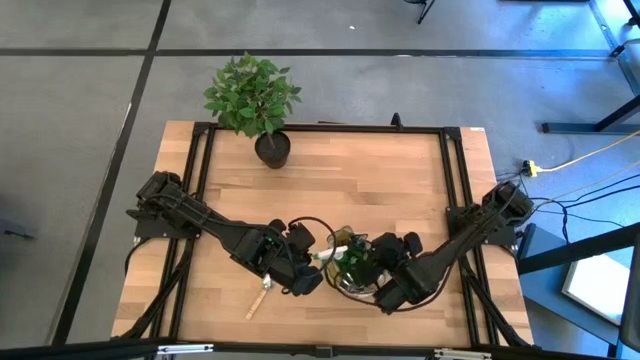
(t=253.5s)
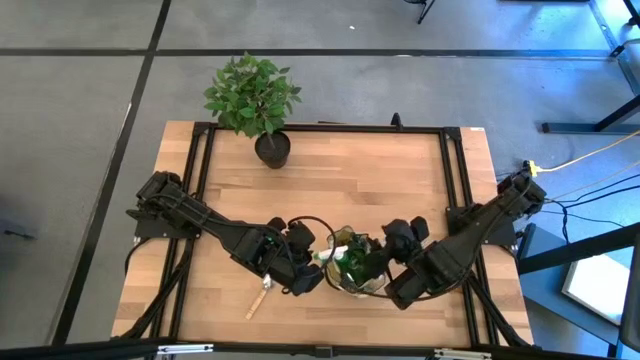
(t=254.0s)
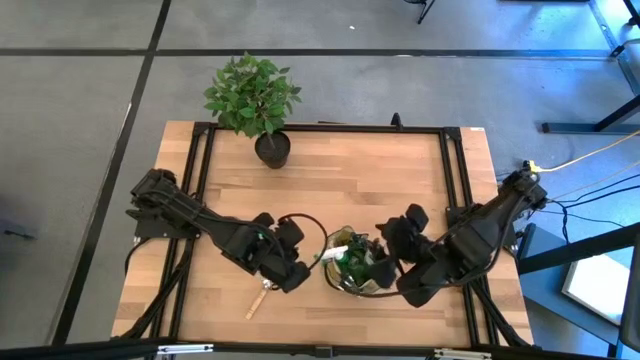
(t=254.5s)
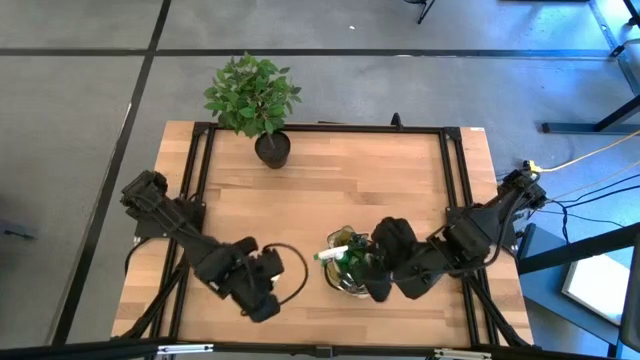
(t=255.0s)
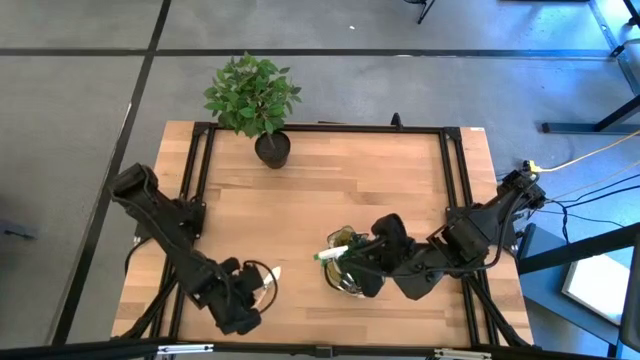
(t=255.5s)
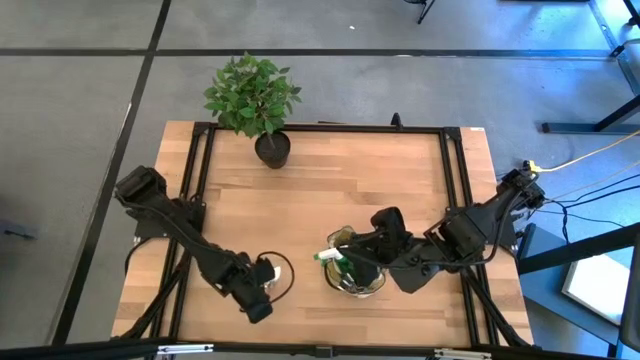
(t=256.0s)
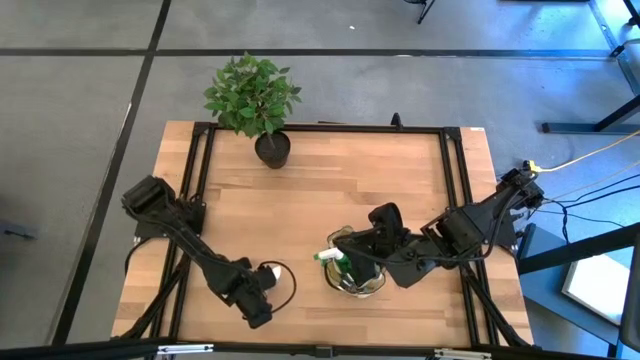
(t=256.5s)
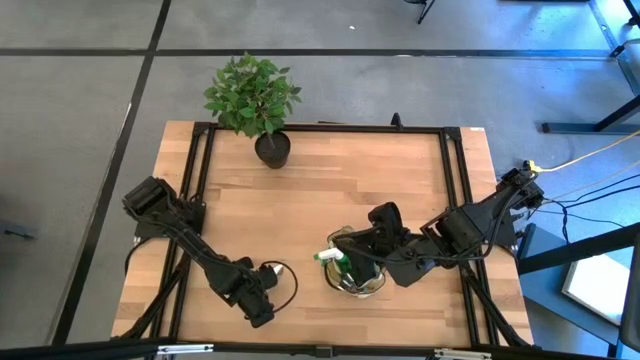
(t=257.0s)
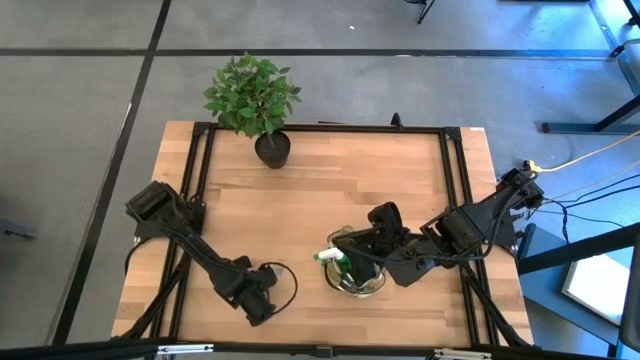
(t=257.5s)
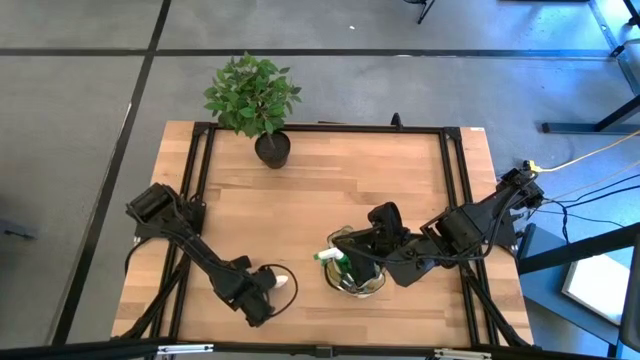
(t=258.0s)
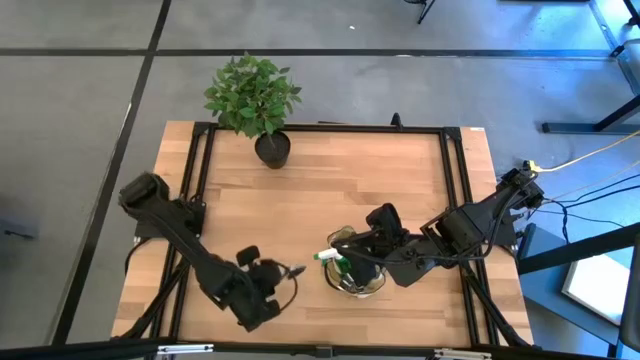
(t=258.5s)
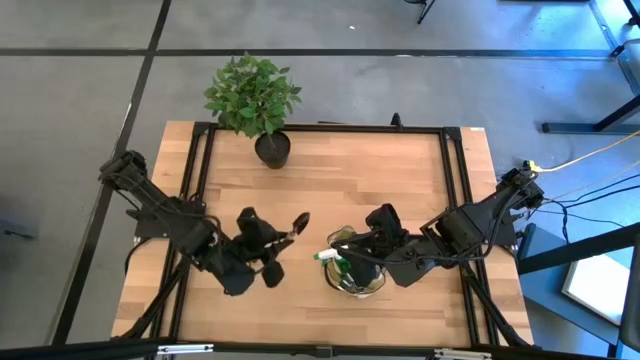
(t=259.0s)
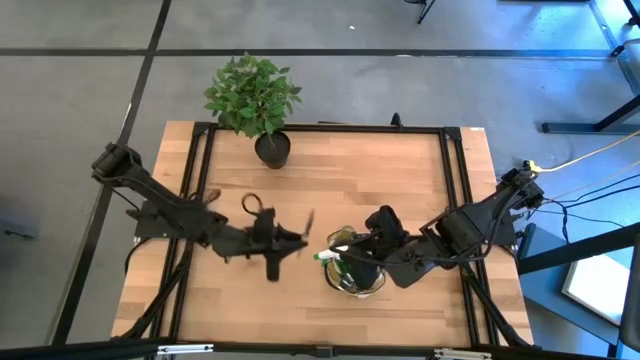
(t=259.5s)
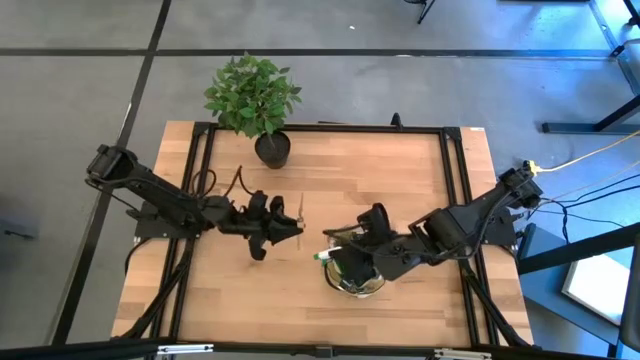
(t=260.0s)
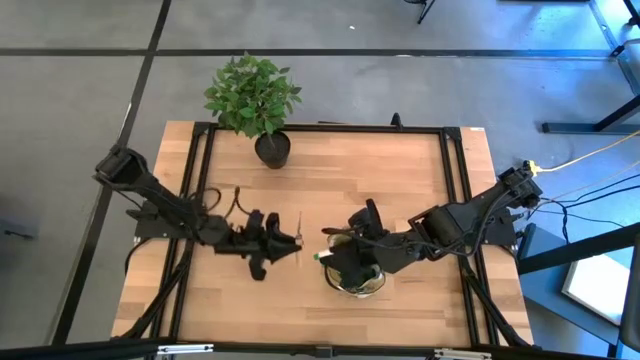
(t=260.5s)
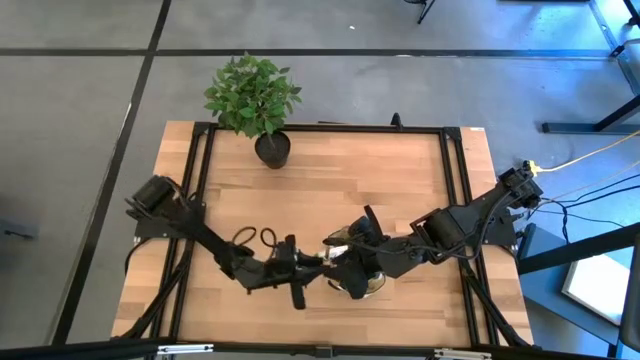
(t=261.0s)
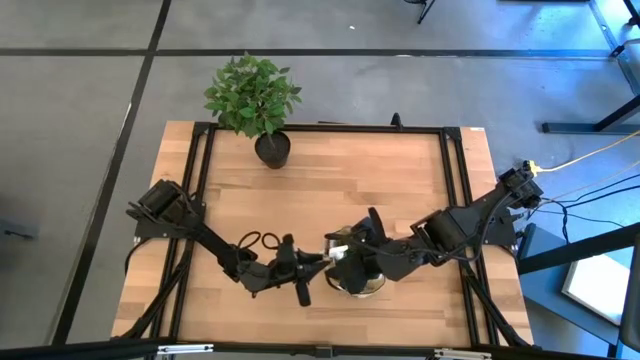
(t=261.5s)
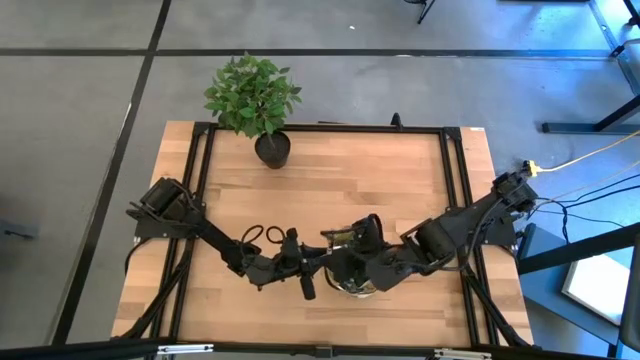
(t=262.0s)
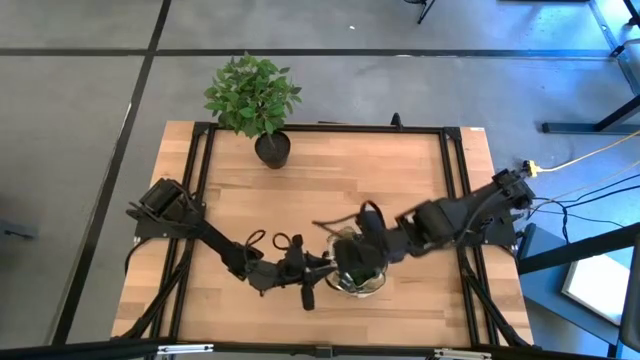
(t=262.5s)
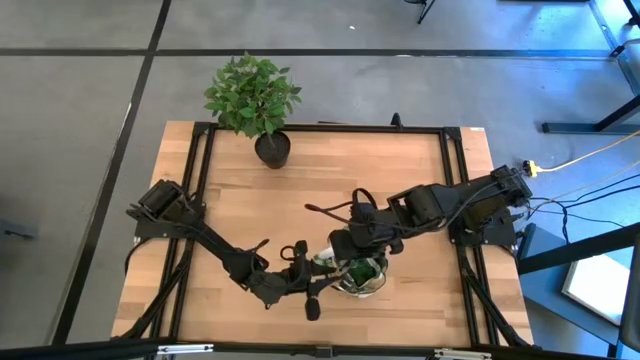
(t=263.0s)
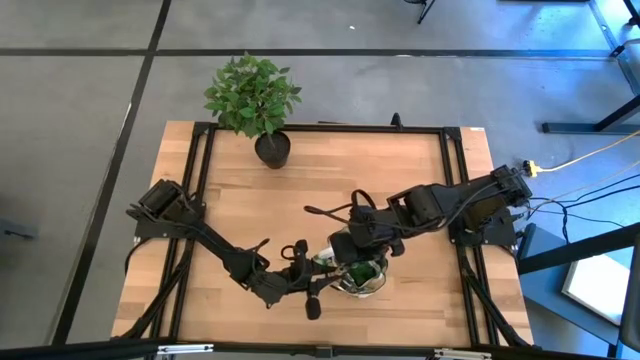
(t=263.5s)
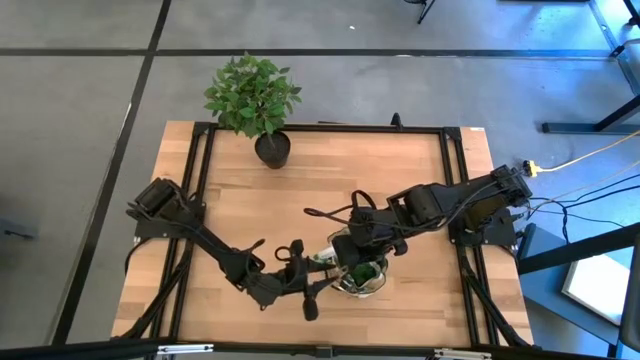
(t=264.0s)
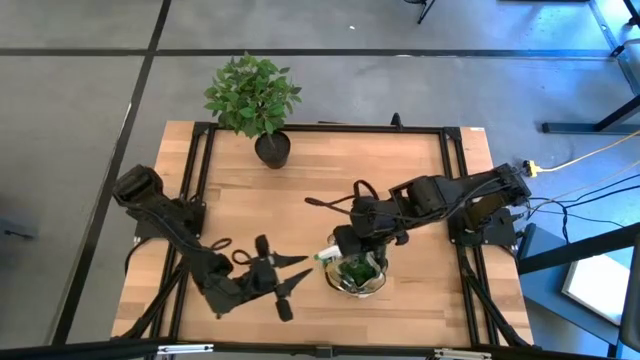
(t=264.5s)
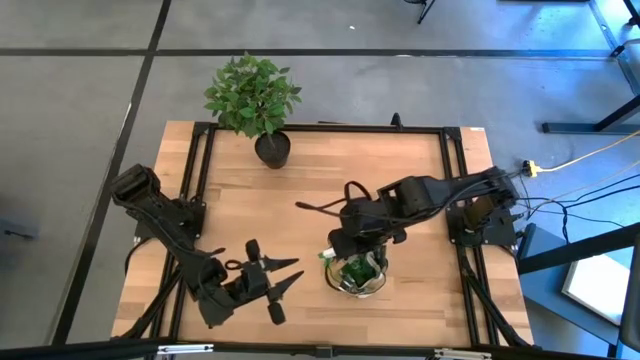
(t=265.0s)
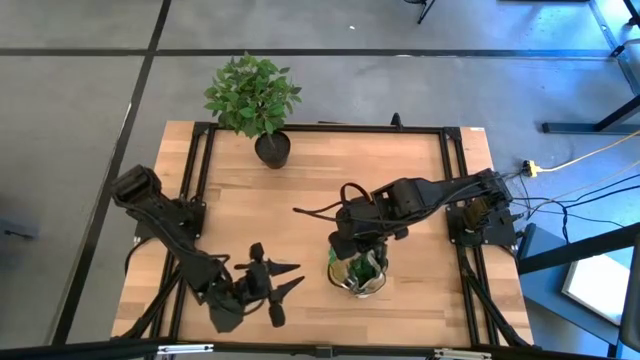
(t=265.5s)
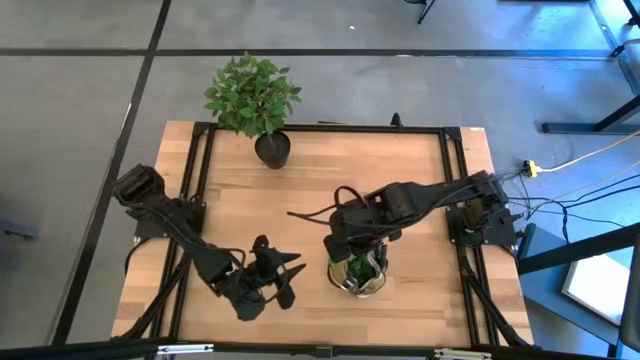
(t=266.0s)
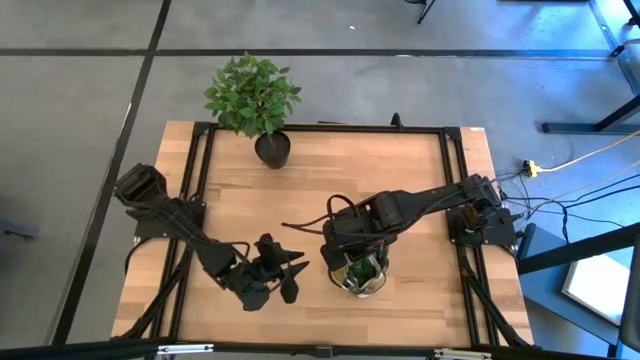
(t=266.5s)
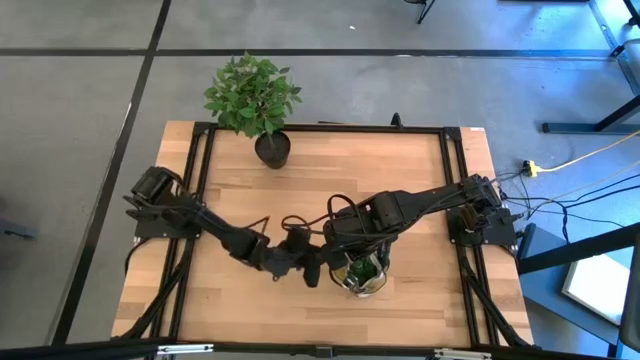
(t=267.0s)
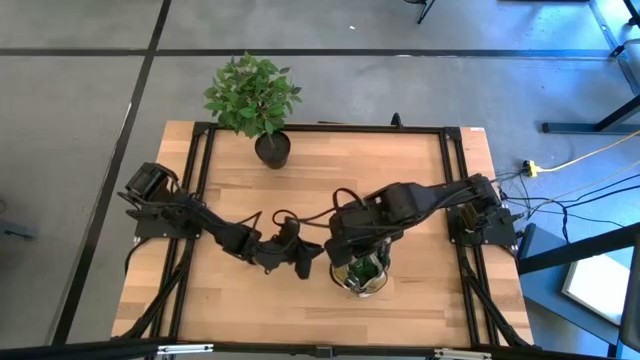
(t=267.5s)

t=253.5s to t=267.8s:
Task: Pick & Place Garden tools in Gardening bag
Put the brown trowel into the brown gardening bag

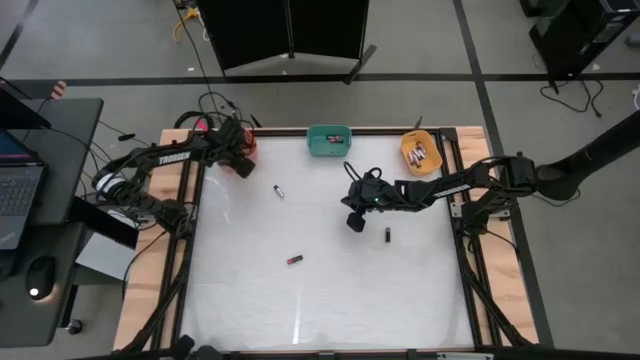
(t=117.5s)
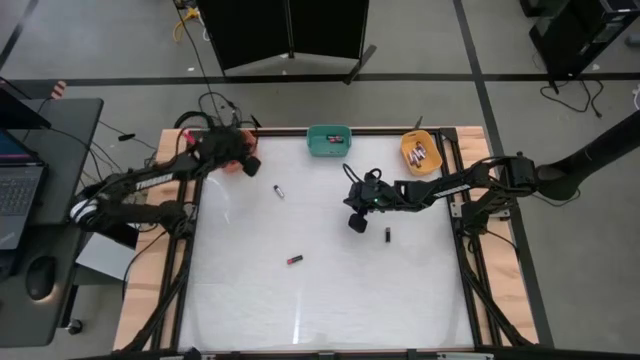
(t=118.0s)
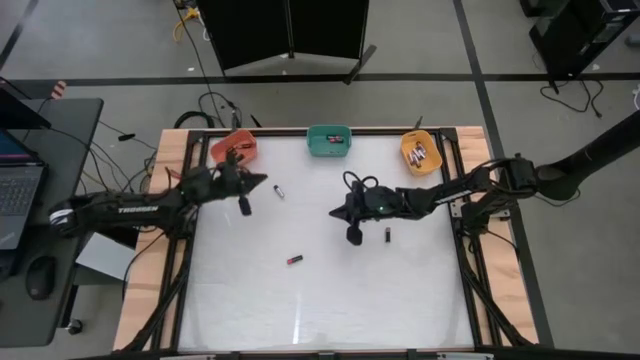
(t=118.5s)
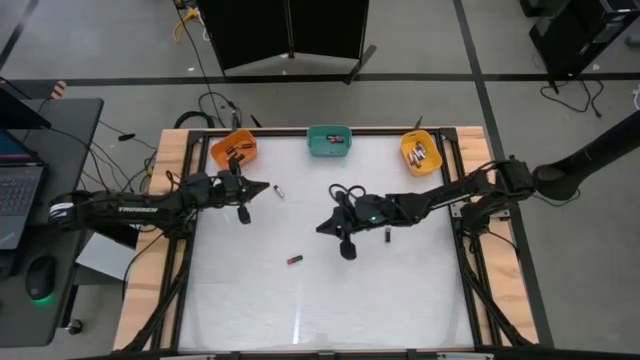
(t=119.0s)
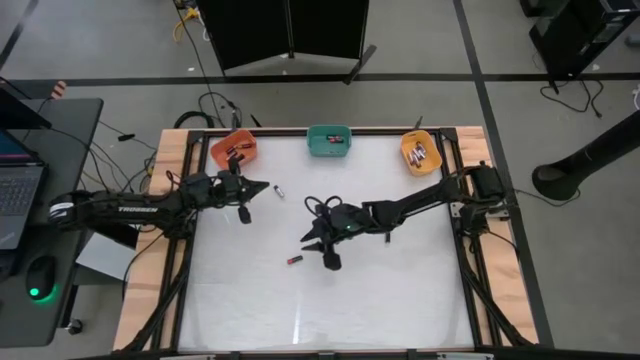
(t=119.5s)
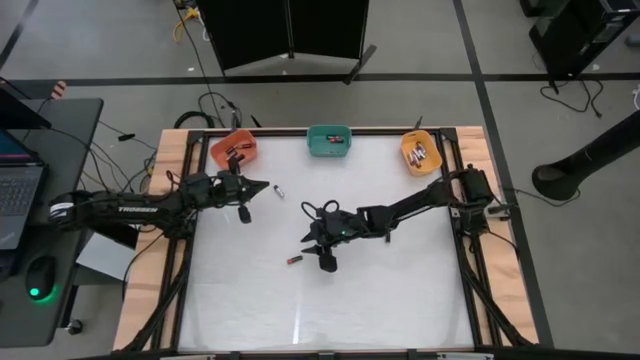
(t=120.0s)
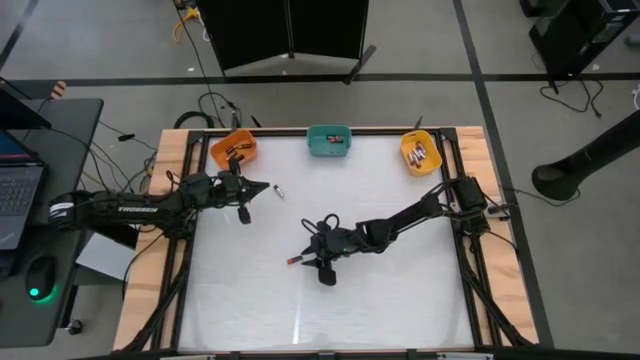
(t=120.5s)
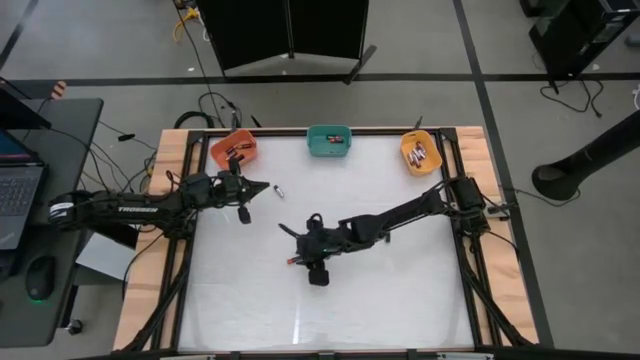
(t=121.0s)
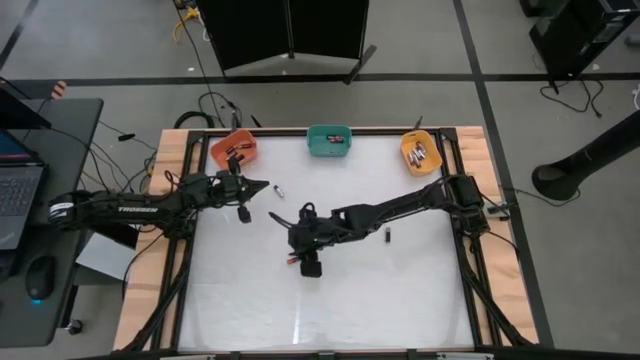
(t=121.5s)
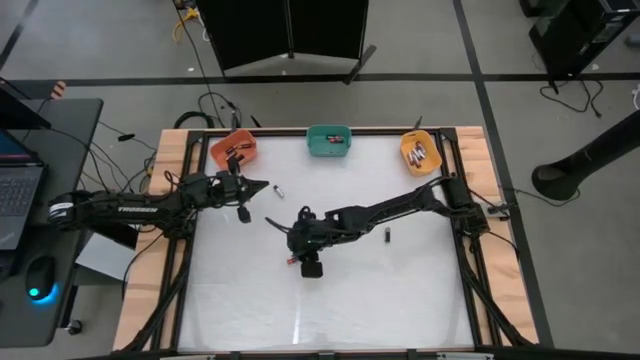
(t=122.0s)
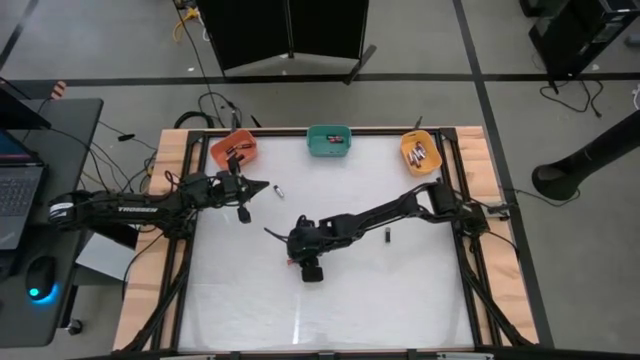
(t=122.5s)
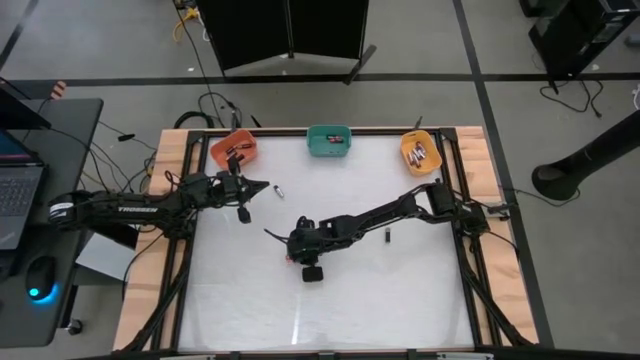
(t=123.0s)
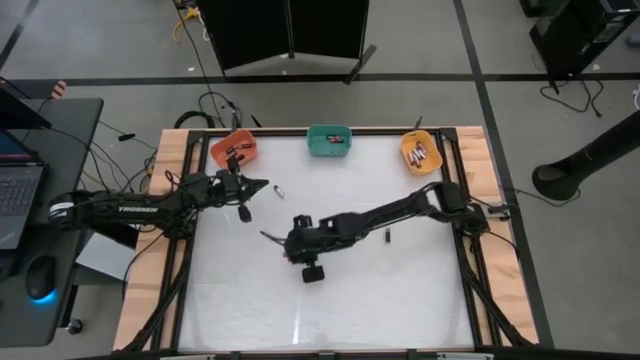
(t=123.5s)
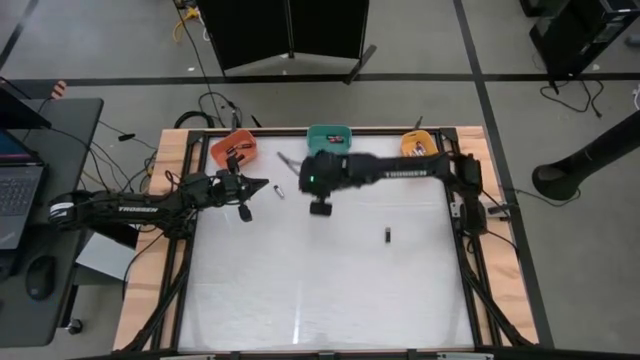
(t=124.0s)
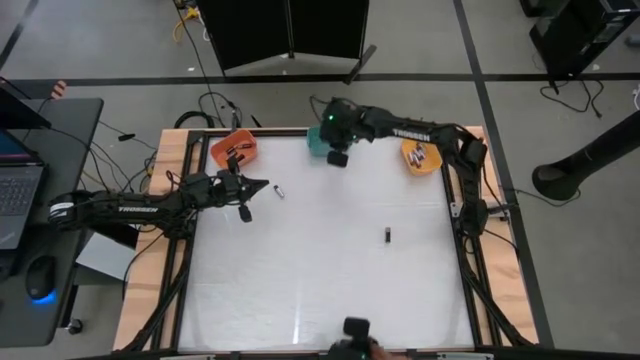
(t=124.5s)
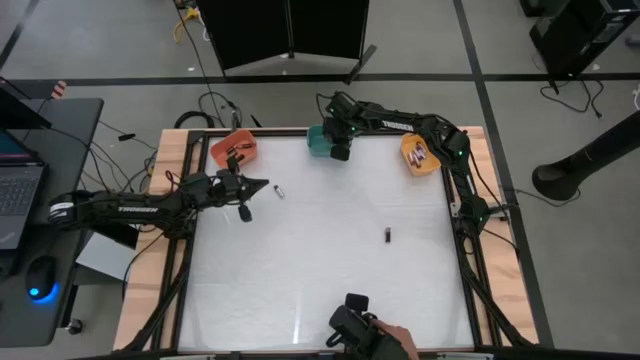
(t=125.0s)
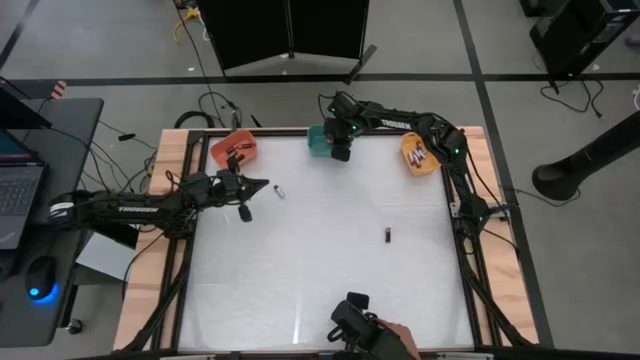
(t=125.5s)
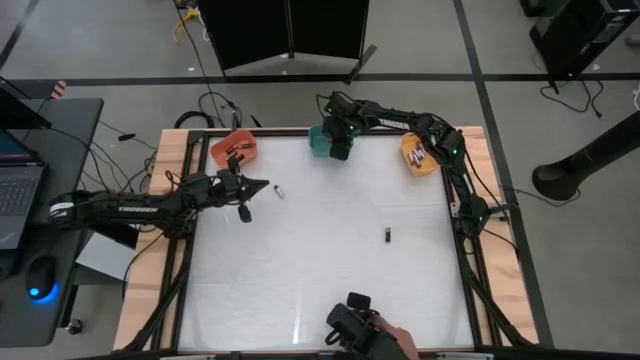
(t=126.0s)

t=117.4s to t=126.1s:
Task: Sort batteries
Put the red battery into the green bin
